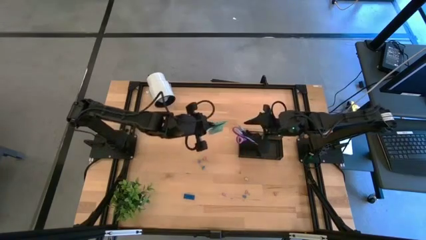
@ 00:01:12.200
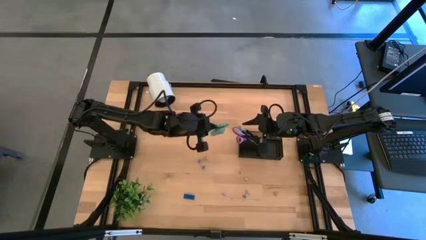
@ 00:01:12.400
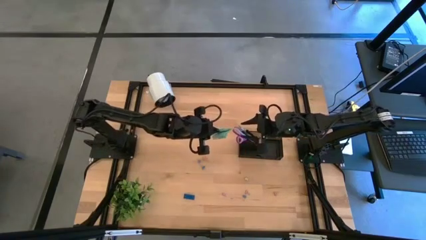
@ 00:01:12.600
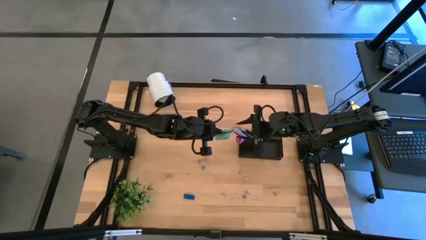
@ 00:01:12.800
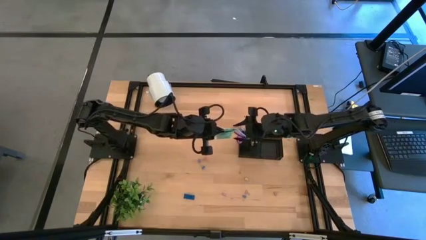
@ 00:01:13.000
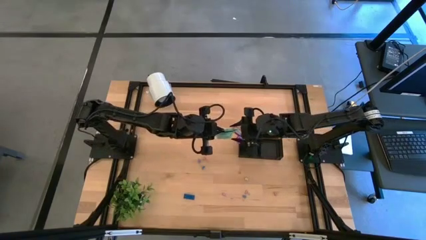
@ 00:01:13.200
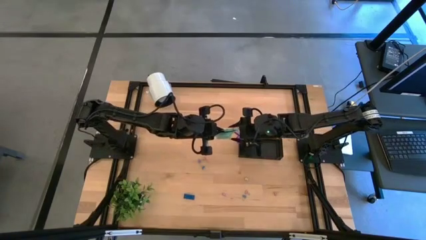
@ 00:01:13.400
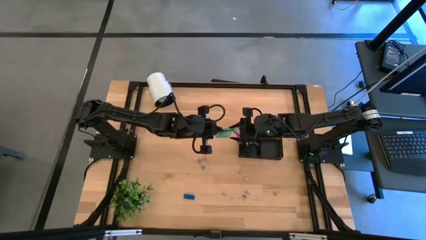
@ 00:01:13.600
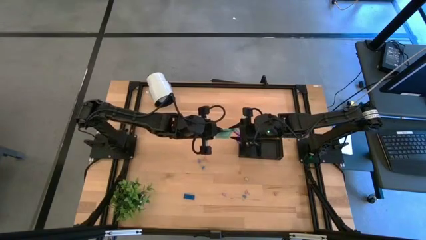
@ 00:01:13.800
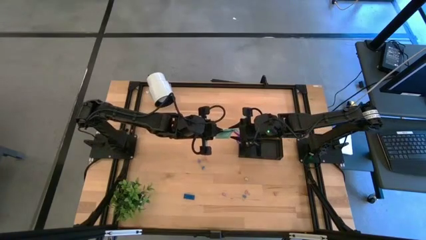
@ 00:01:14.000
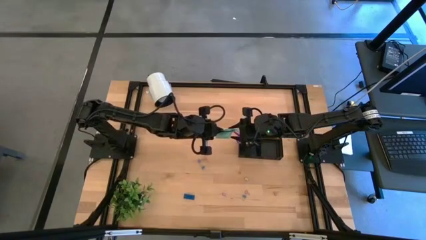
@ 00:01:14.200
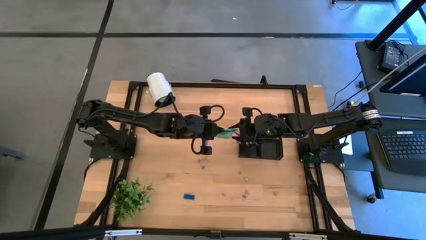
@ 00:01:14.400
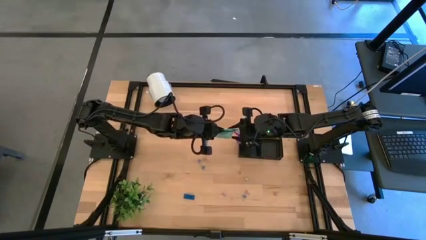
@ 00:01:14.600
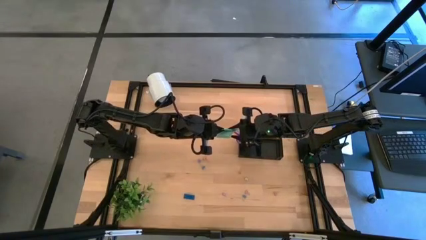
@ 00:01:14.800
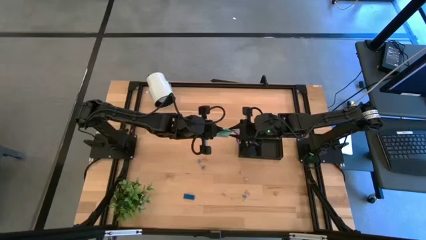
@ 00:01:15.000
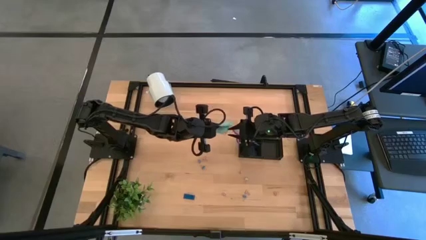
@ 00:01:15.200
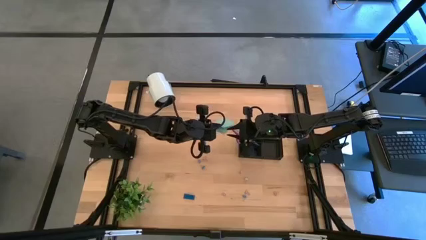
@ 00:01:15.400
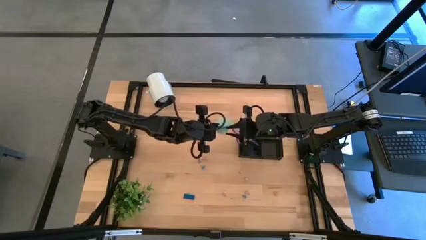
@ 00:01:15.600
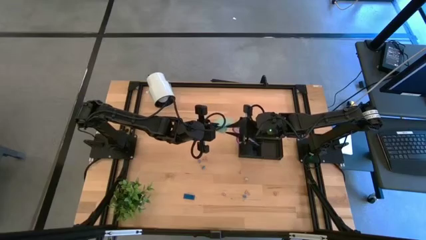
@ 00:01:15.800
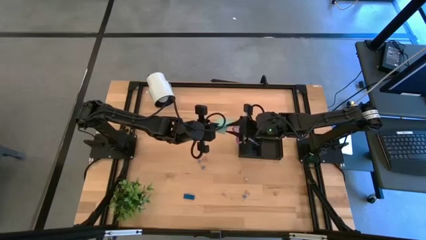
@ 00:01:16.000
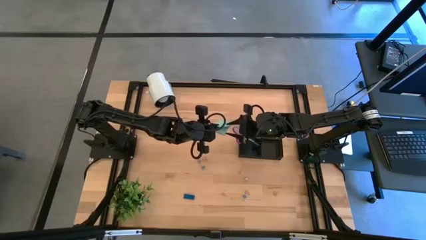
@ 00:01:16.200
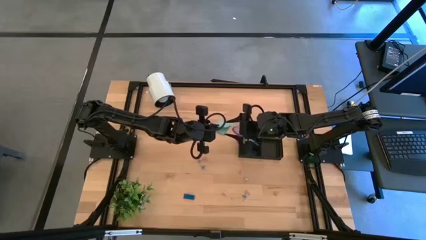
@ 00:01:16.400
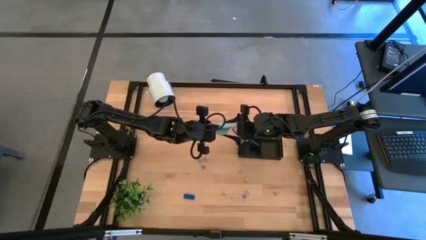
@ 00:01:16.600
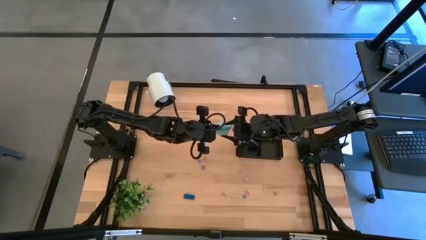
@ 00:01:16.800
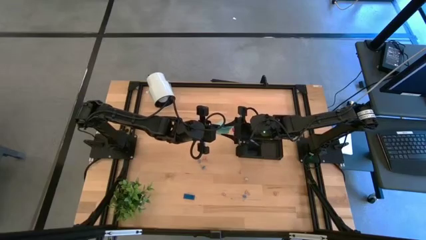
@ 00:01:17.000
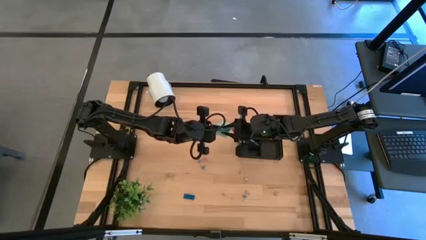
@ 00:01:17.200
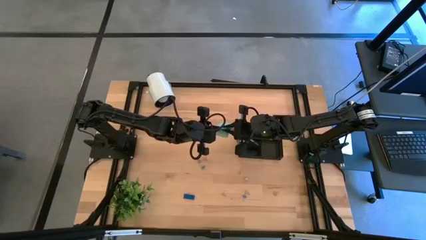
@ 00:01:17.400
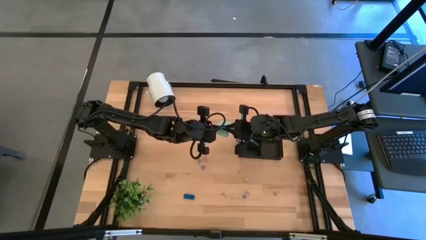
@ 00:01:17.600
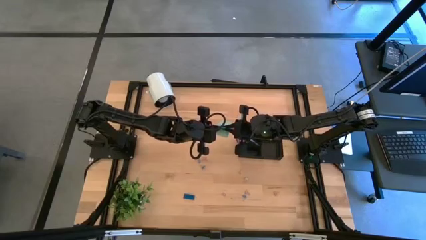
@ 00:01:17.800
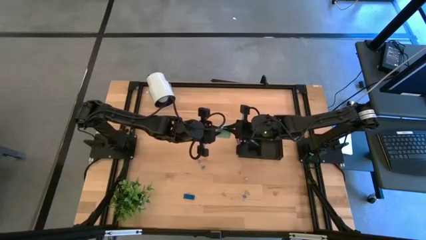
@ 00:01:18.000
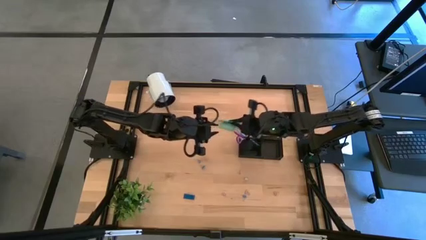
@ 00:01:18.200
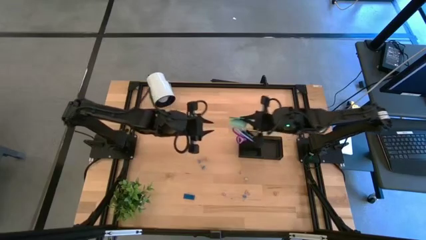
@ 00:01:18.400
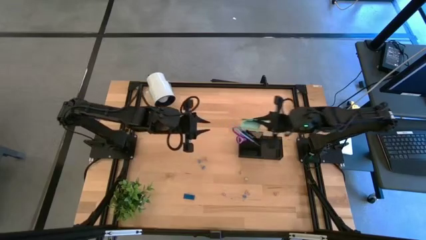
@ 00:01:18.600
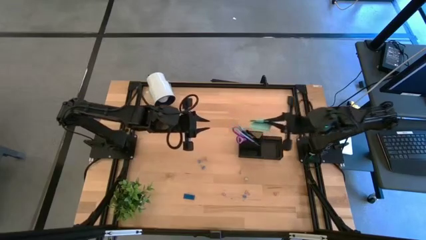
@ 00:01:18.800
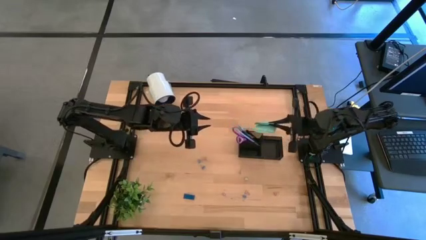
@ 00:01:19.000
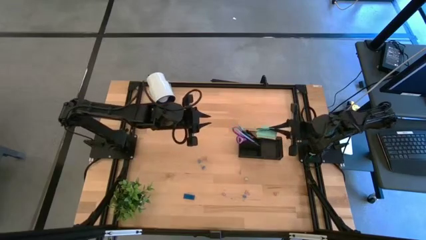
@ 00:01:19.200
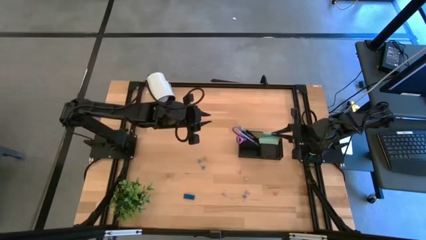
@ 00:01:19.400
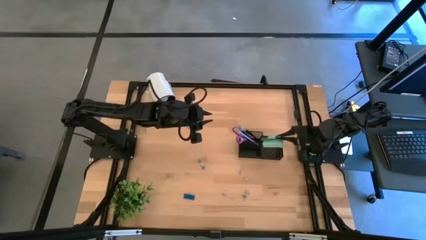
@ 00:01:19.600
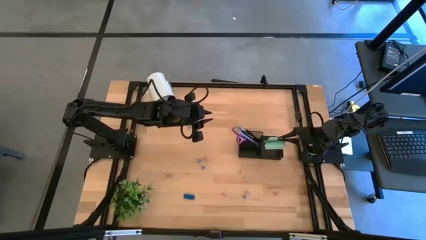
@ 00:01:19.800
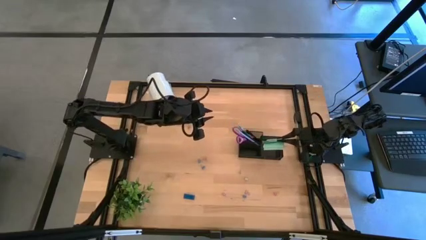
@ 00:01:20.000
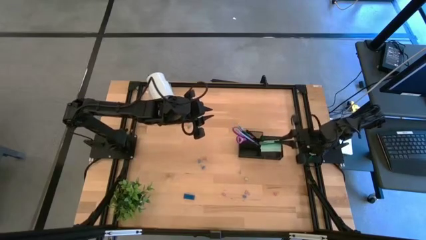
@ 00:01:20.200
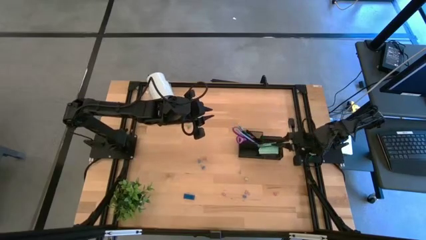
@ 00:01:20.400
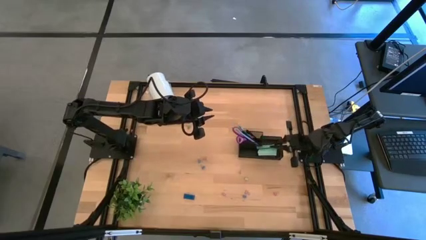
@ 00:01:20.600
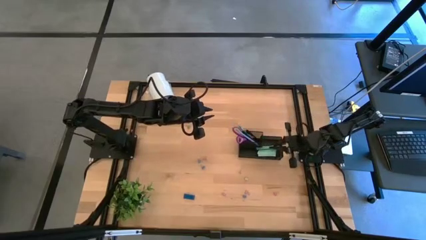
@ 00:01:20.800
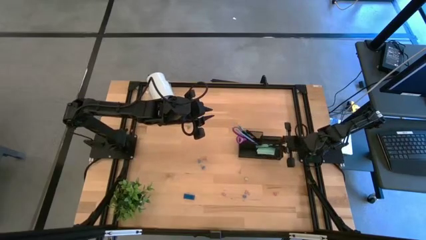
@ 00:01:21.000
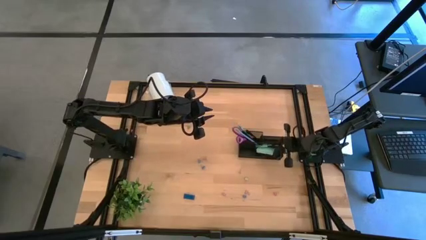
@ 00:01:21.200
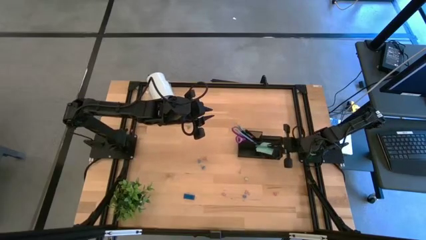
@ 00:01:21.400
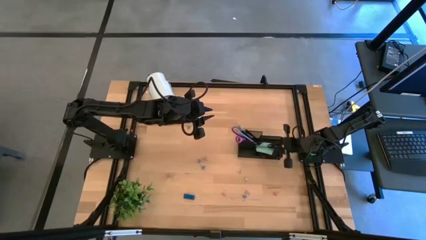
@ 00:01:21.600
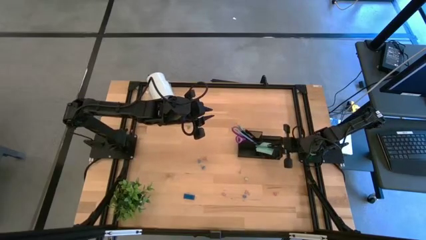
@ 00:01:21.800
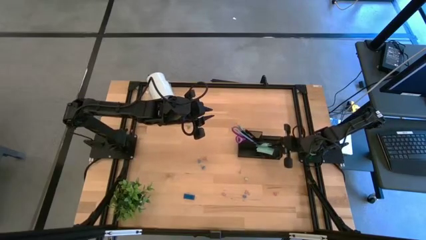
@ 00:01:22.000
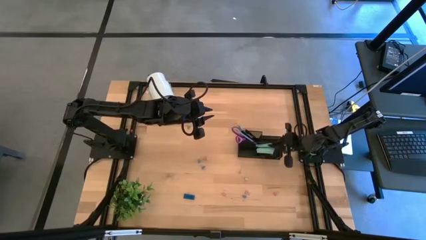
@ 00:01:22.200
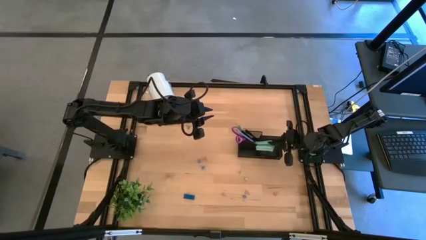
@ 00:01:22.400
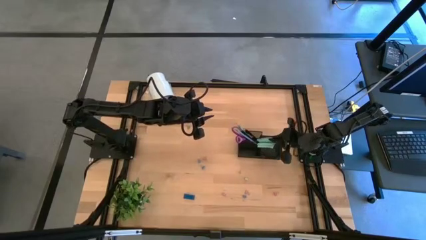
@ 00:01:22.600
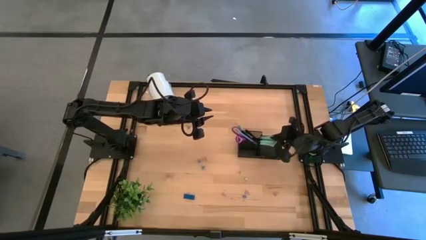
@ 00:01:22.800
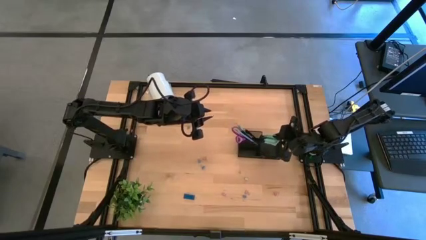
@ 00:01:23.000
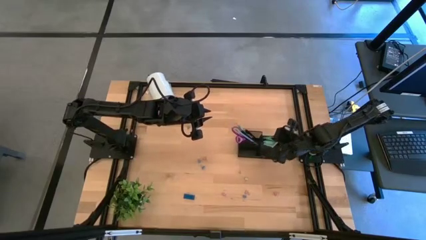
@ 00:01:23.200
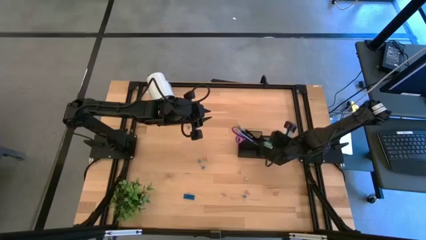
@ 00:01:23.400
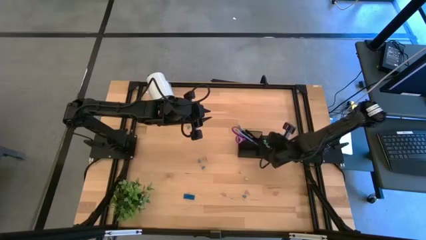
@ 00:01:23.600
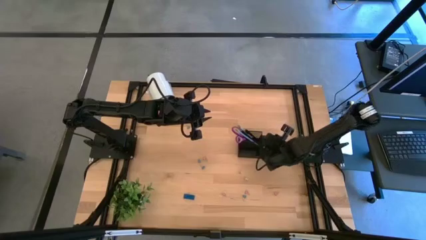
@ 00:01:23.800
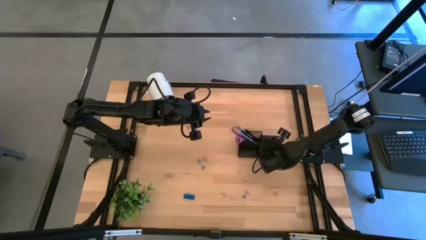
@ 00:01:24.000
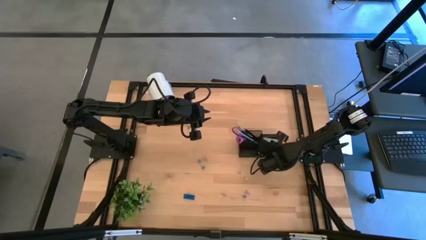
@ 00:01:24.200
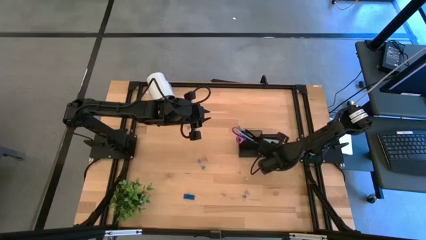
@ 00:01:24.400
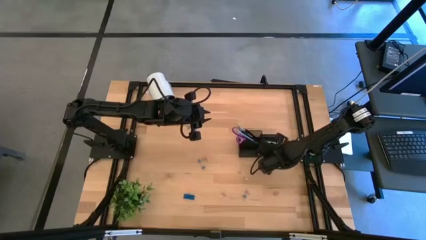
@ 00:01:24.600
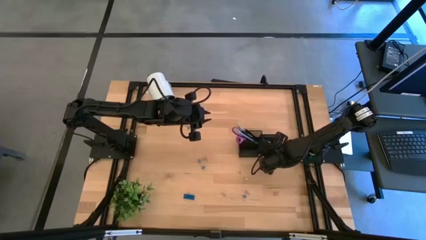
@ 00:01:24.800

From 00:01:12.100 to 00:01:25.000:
Task: Pick and place office supplies into organizer
Put the light blue sticky notes into the black desk organizer
